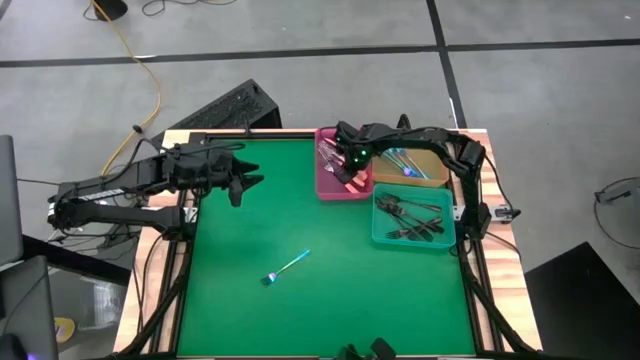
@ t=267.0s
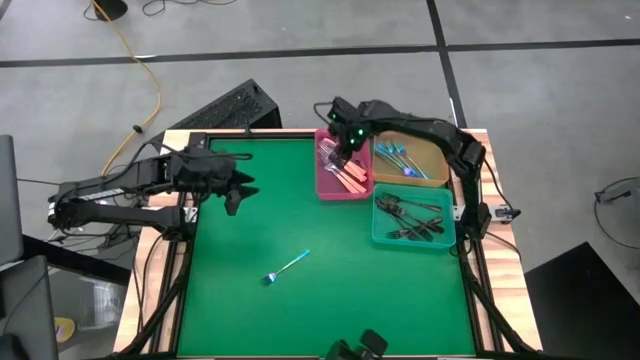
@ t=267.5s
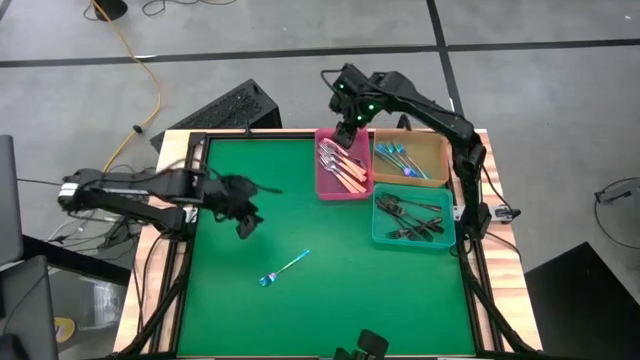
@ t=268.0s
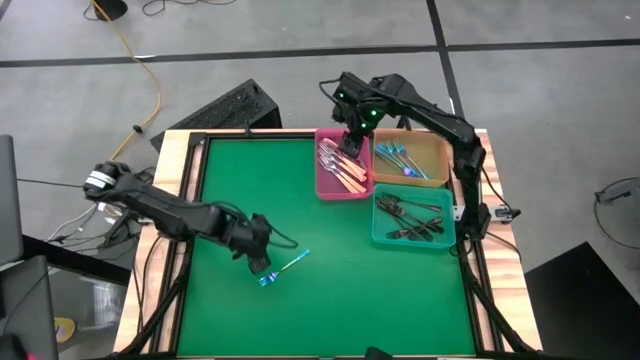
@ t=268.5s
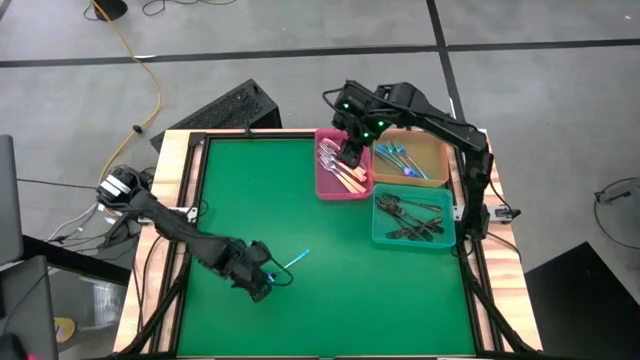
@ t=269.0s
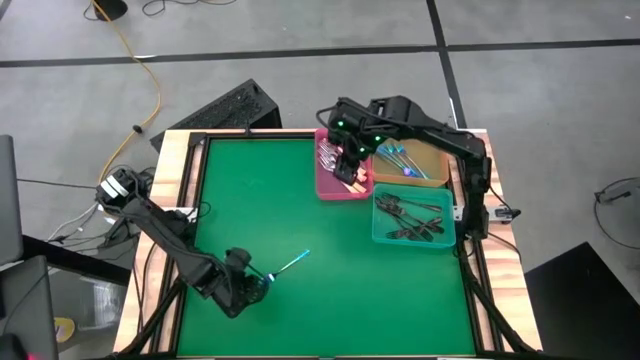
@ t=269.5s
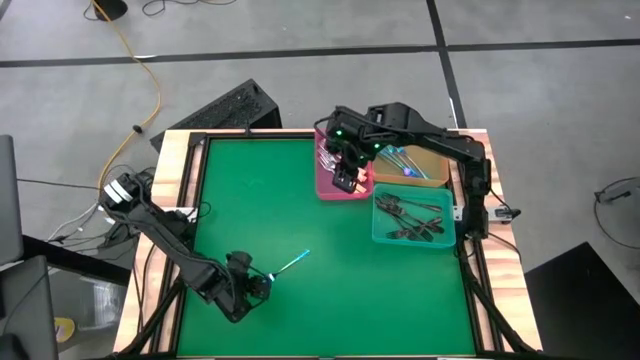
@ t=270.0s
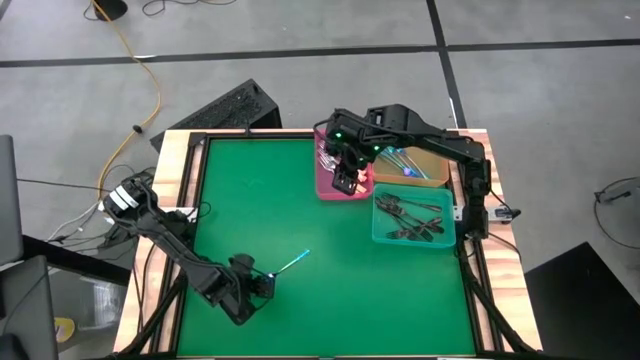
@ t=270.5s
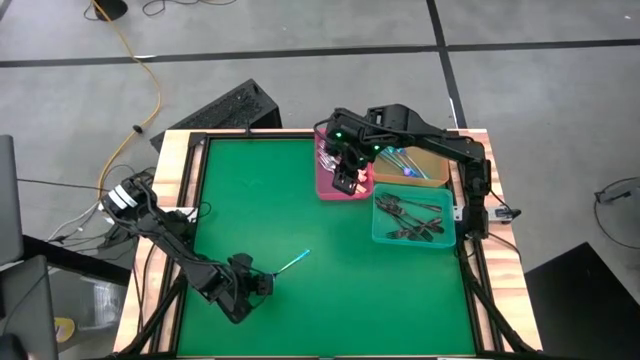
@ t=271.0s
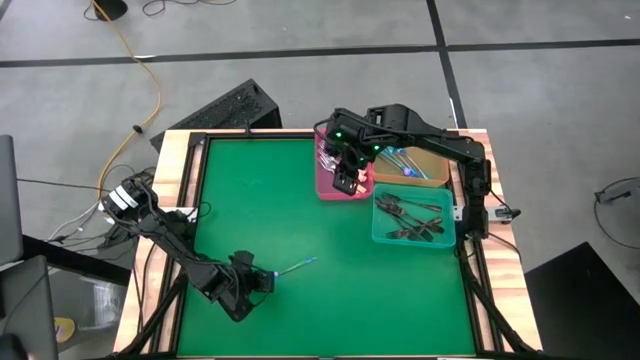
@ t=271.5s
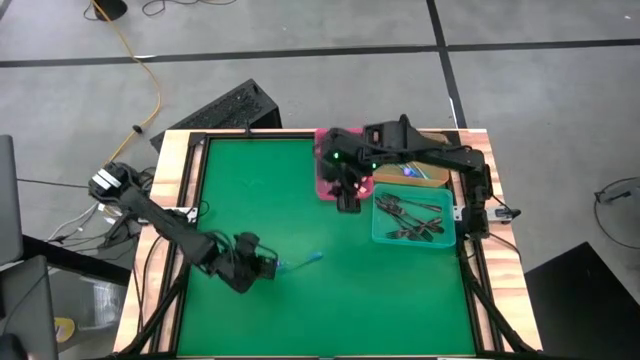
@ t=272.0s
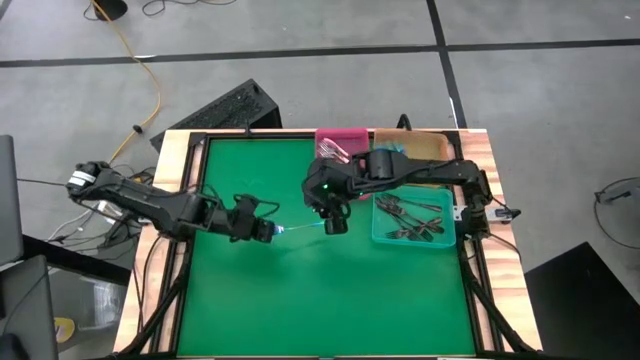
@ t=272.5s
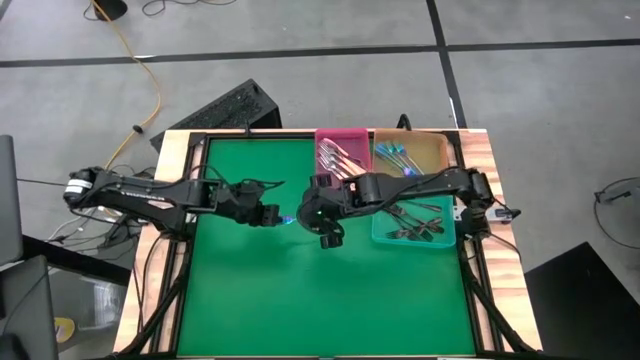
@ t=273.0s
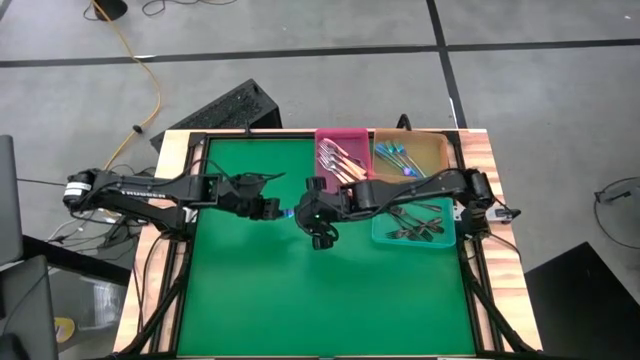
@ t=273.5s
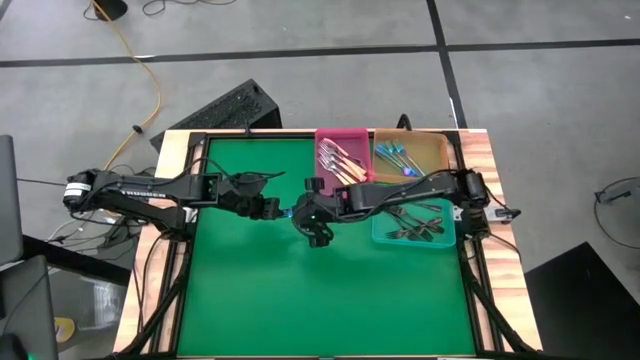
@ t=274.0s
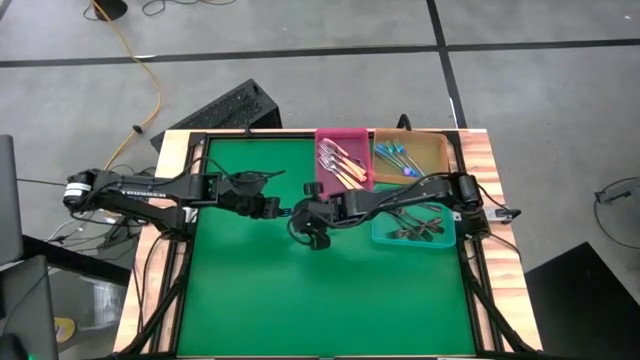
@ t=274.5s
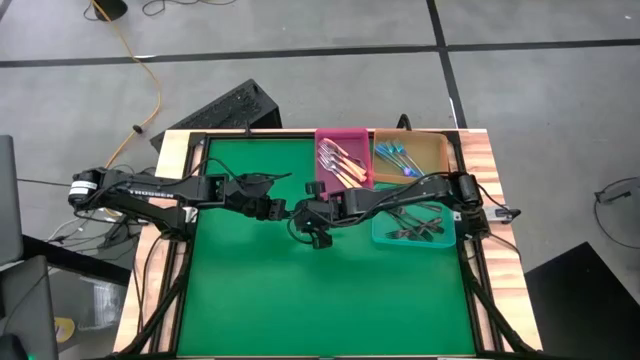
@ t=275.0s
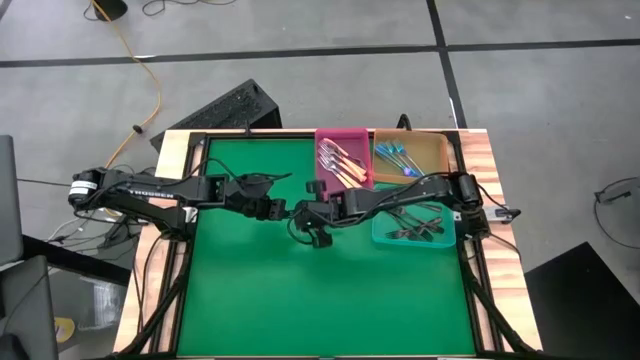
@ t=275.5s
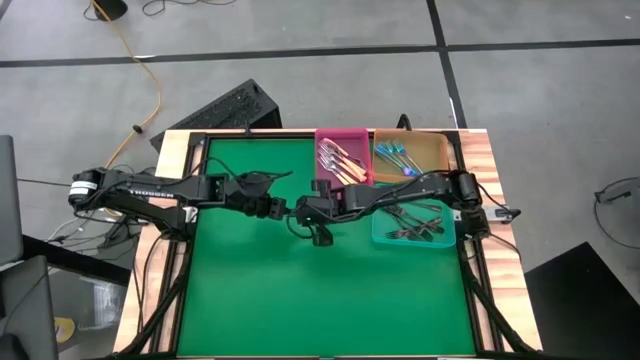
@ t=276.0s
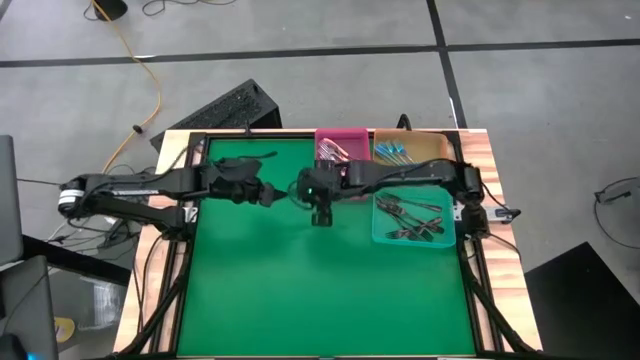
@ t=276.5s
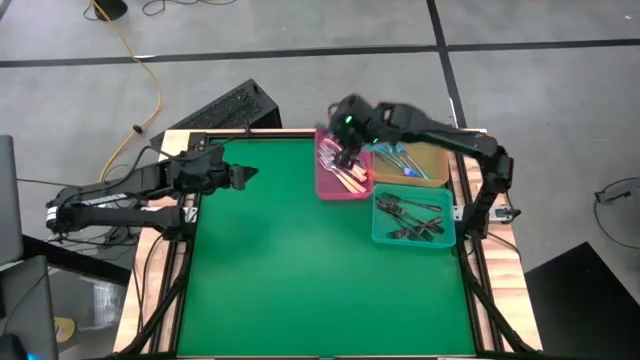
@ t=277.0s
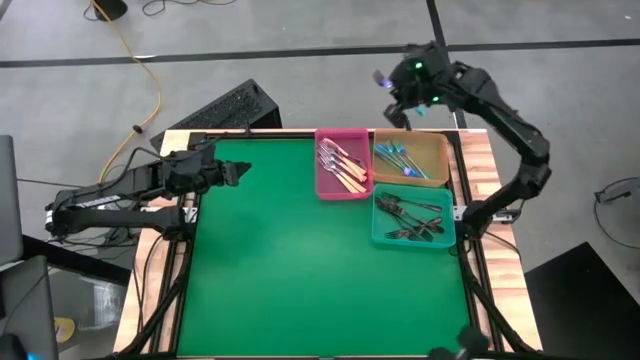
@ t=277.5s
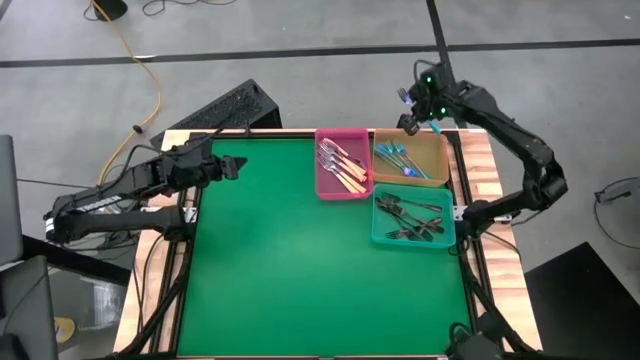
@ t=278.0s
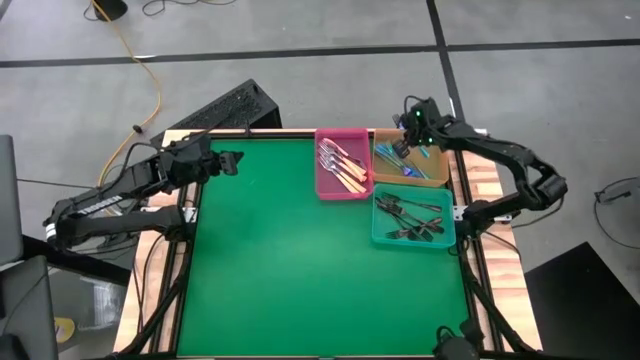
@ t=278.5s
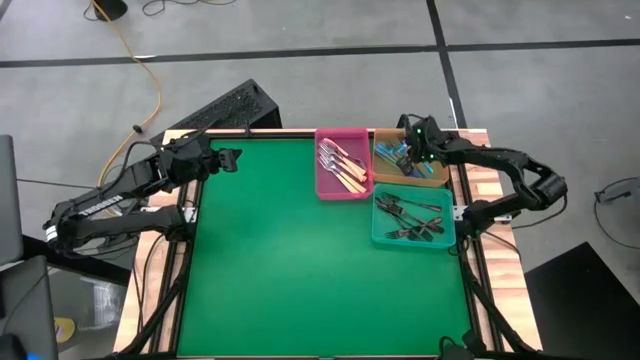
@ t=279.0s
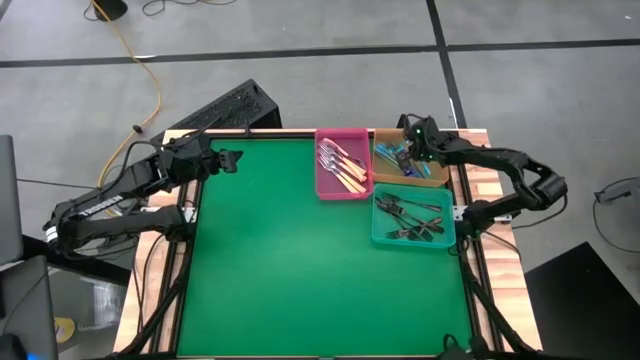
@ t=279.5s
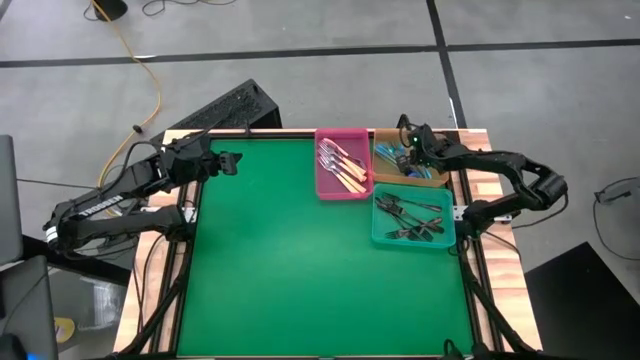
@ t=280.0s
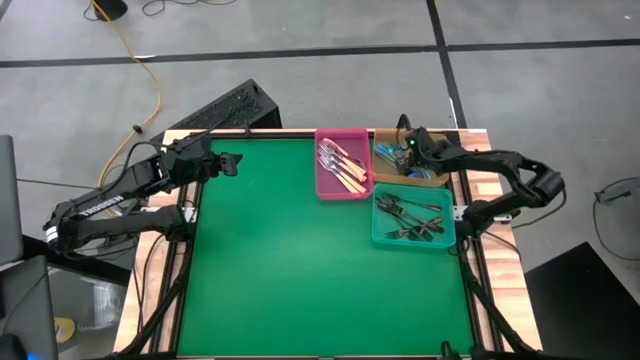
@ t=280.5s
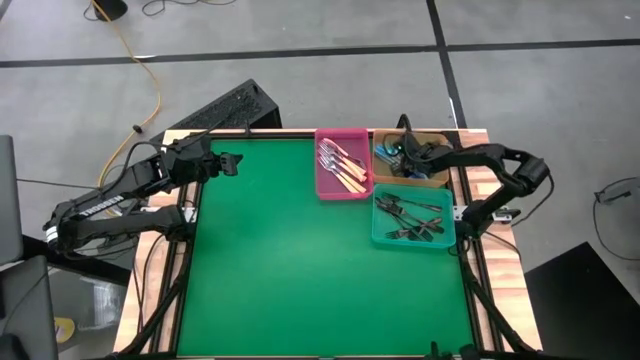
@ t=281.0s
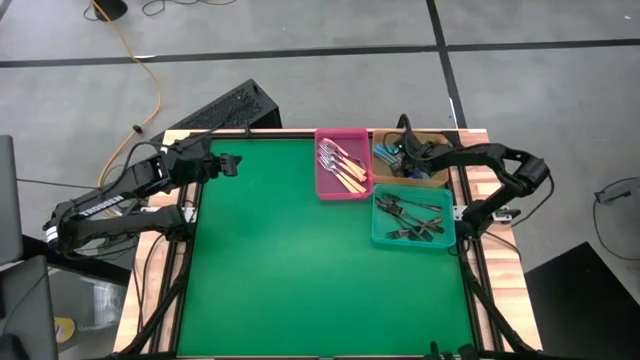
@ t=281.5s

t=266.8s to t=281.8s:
Task: Sort silverware by color (type)
Put the blue fork into the orange bin

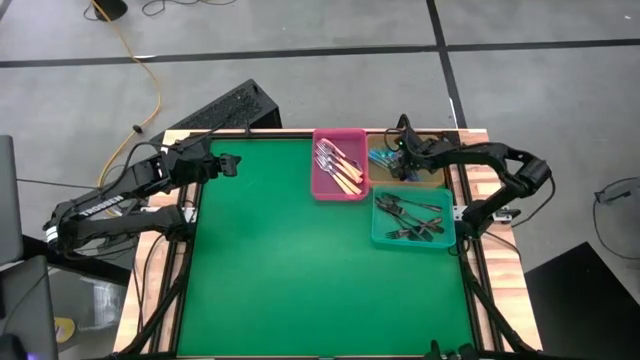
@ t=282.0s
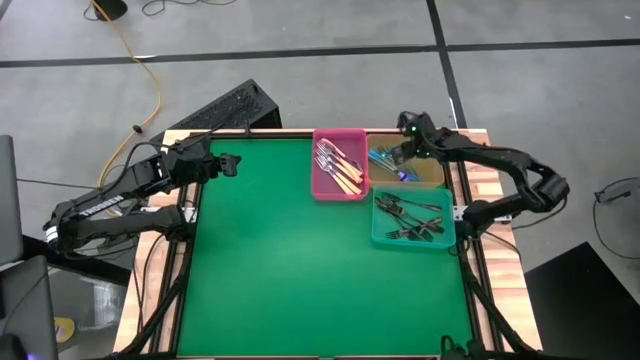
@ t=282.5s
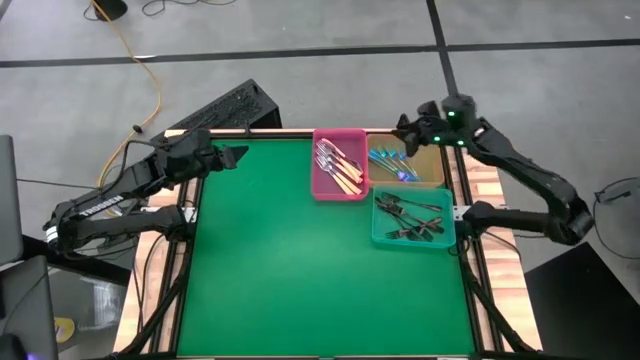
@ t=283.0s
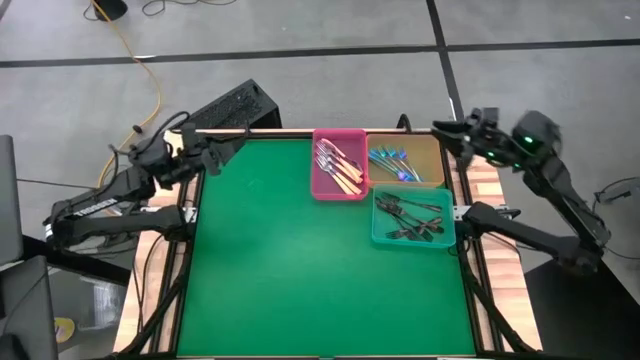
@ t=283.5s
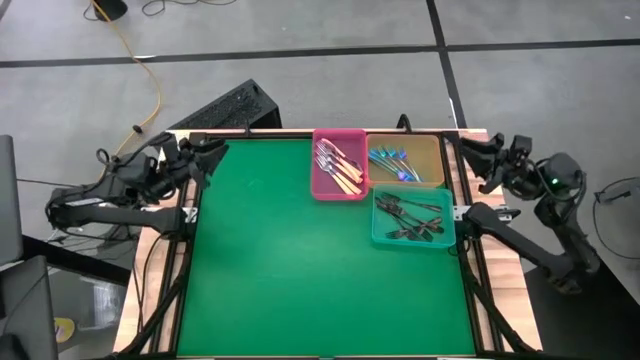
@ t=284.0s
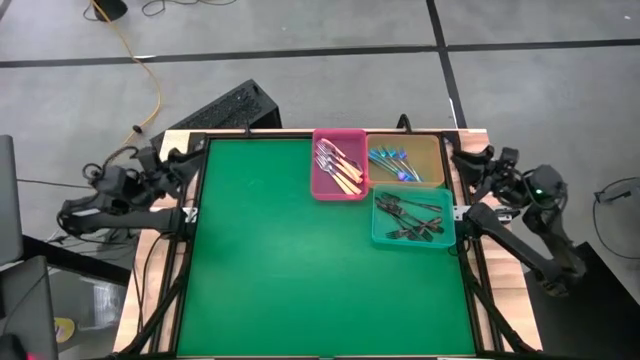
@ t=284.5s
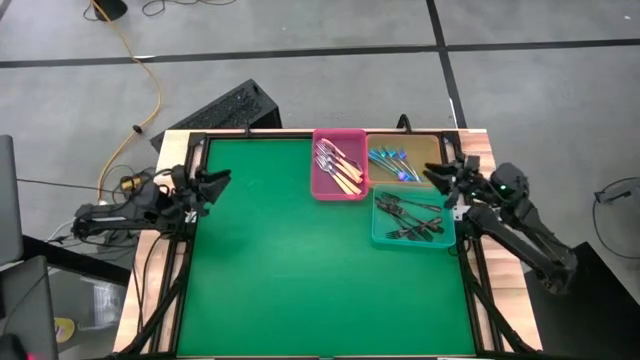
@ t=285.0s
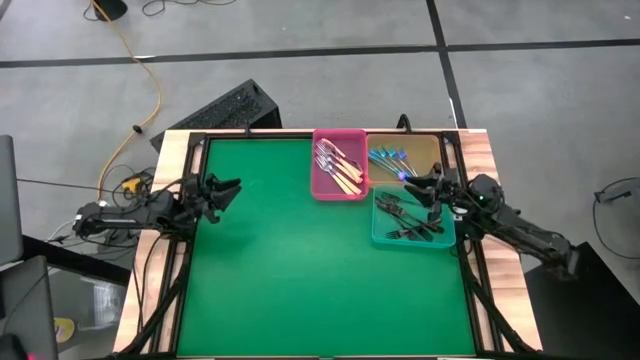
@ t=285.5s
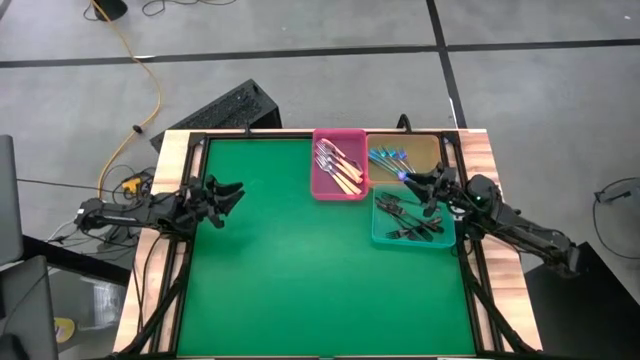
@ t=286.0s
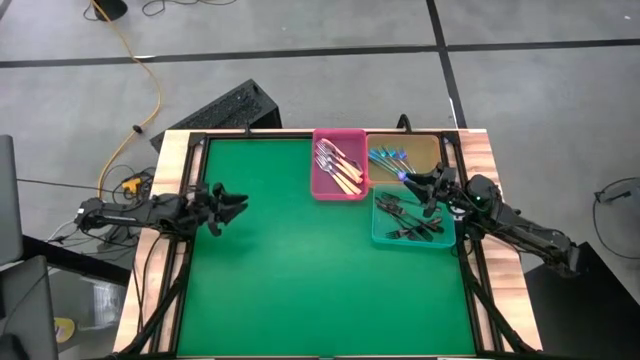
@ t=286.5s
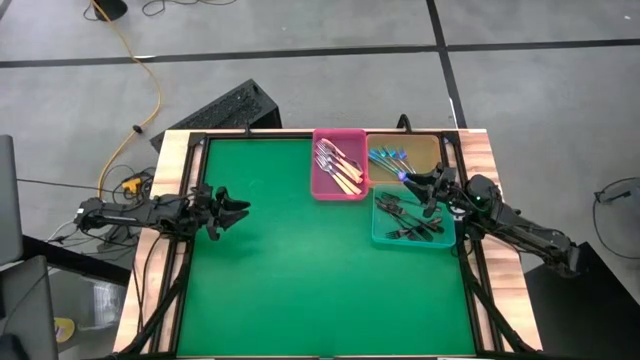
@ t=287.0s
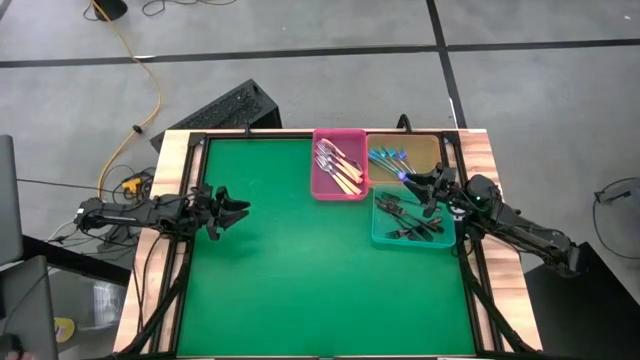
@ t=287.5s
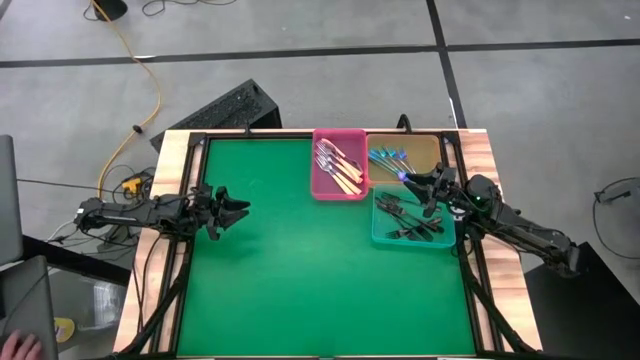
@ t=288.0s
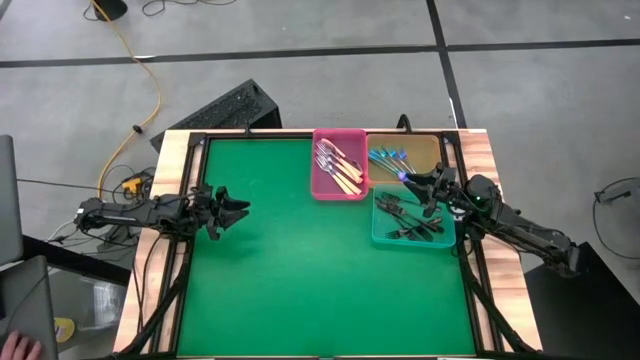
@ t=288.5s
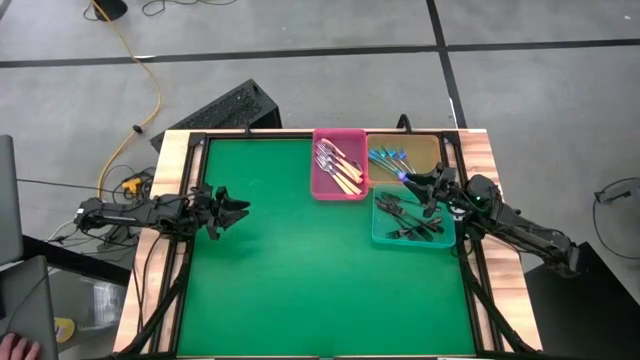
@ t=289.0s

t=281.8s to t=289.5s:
Return to Home Position
